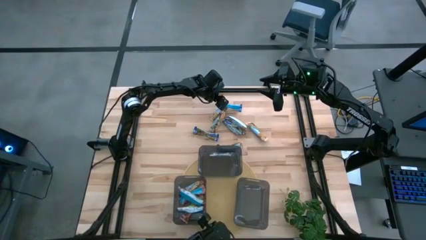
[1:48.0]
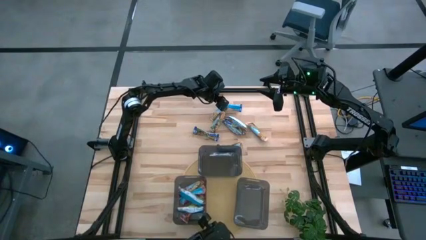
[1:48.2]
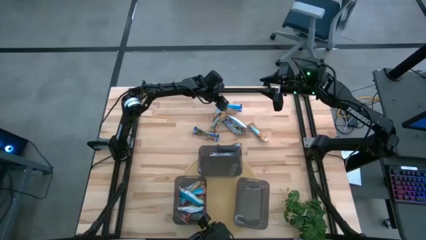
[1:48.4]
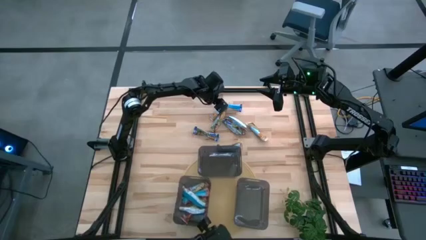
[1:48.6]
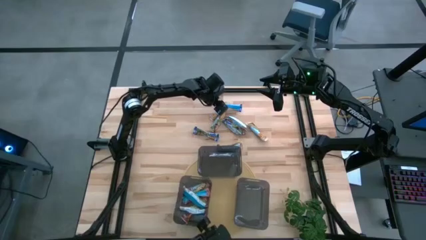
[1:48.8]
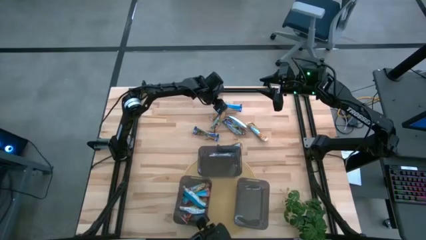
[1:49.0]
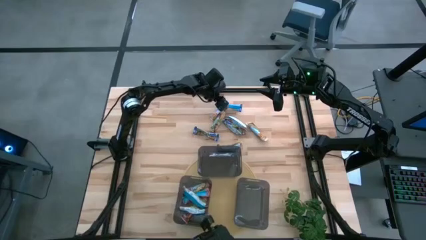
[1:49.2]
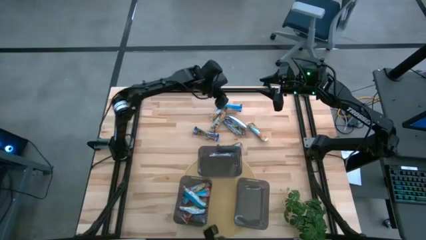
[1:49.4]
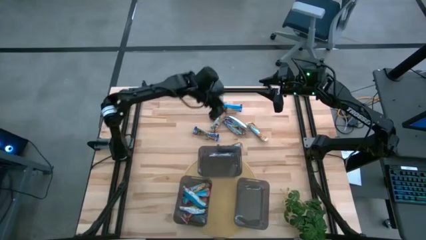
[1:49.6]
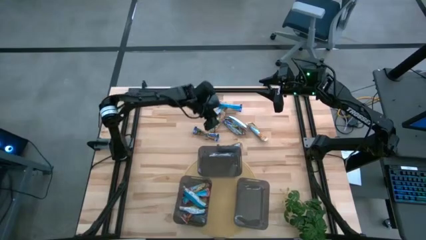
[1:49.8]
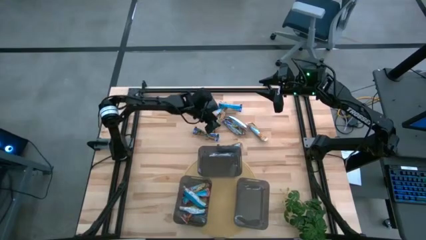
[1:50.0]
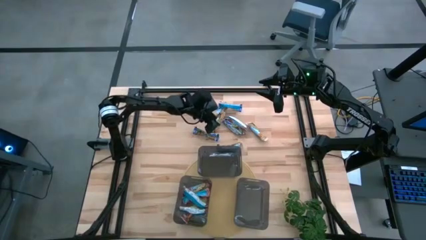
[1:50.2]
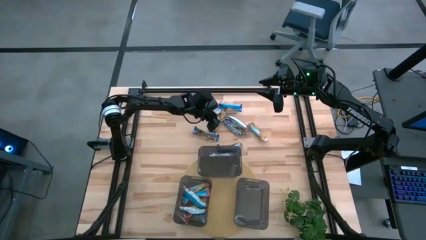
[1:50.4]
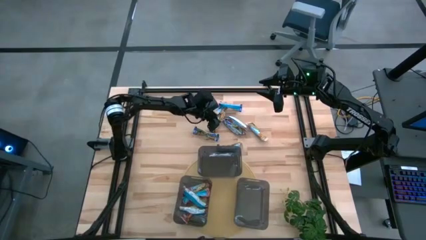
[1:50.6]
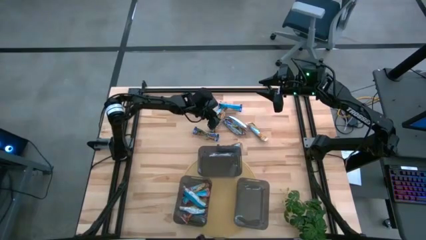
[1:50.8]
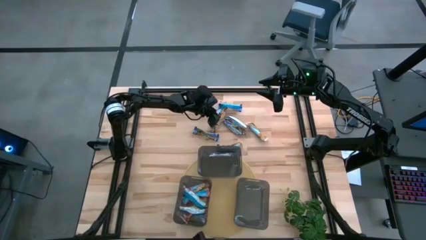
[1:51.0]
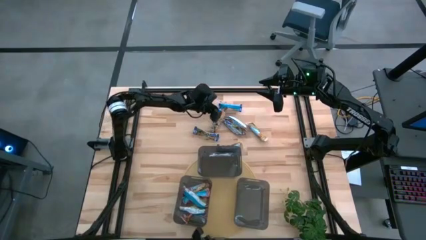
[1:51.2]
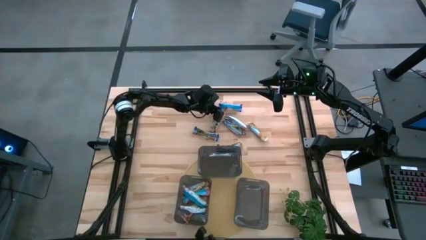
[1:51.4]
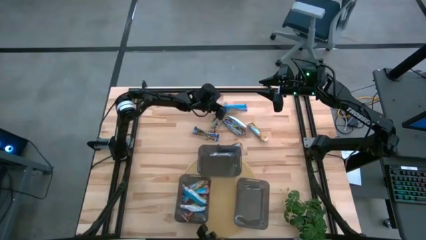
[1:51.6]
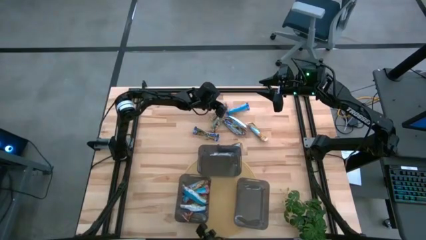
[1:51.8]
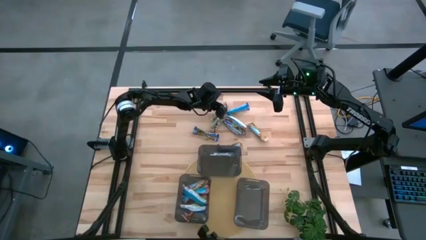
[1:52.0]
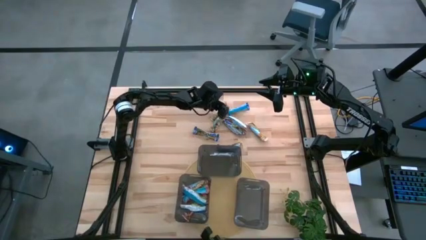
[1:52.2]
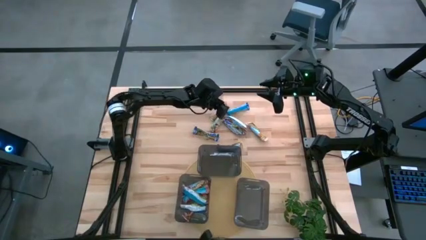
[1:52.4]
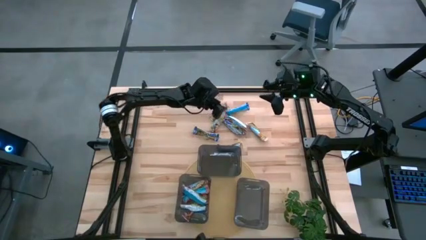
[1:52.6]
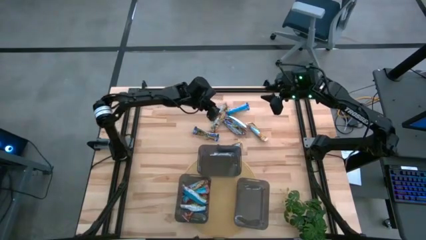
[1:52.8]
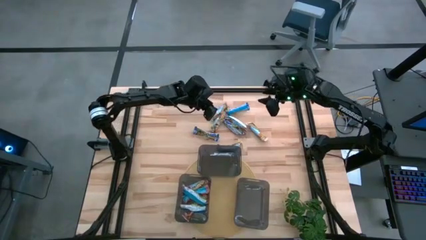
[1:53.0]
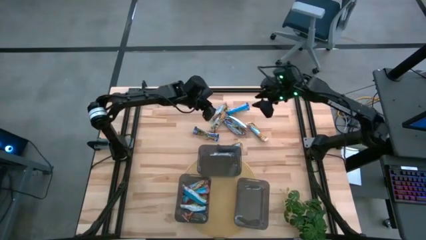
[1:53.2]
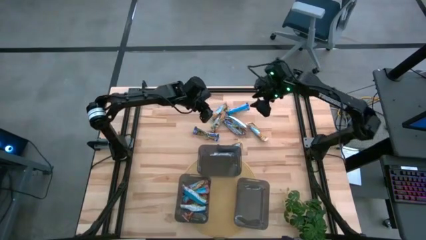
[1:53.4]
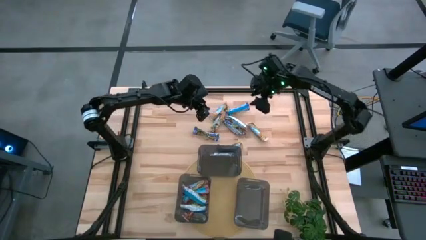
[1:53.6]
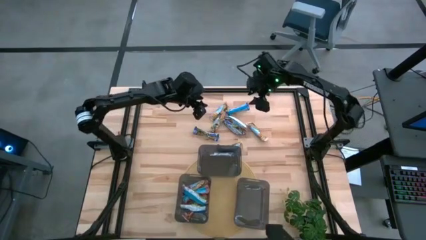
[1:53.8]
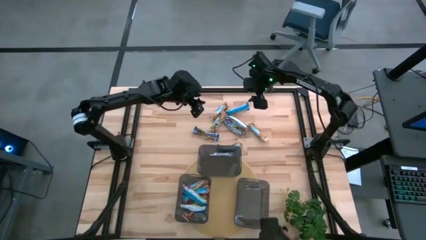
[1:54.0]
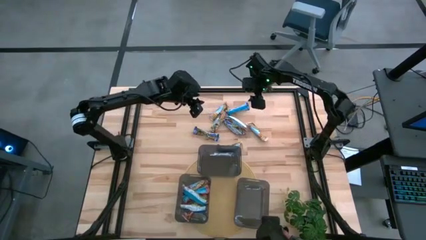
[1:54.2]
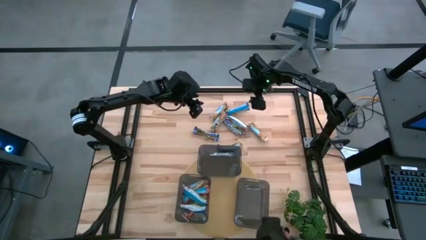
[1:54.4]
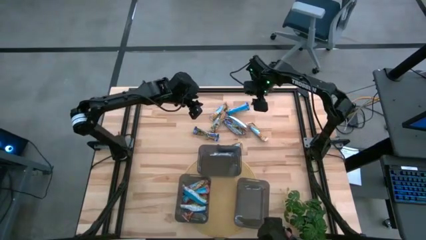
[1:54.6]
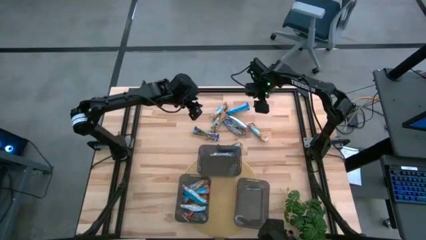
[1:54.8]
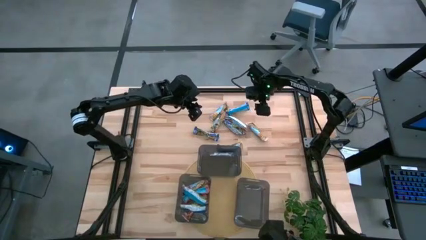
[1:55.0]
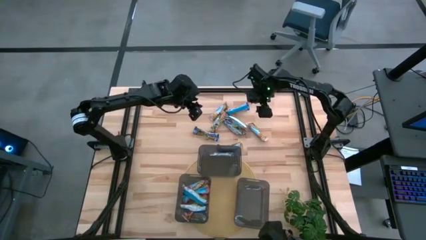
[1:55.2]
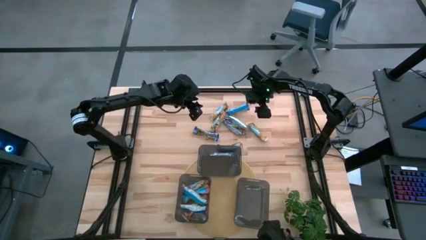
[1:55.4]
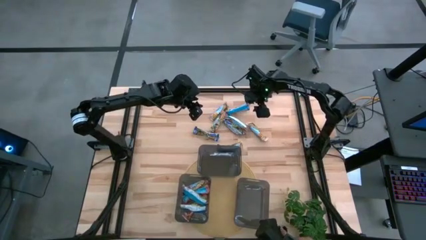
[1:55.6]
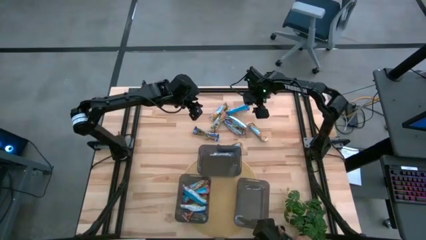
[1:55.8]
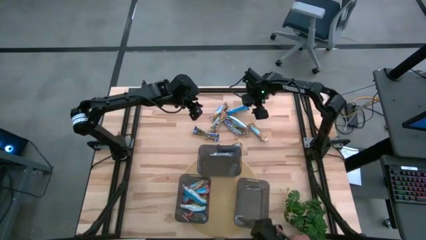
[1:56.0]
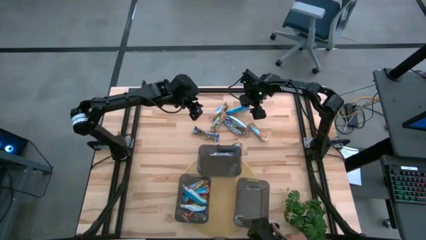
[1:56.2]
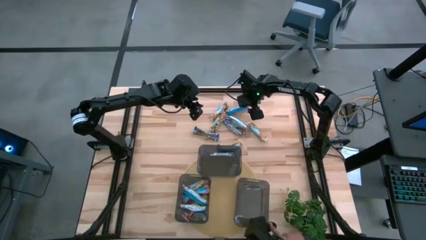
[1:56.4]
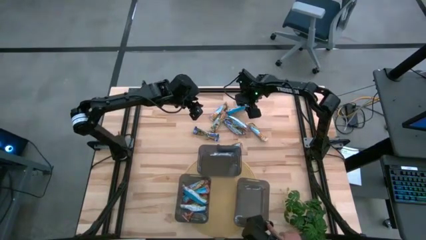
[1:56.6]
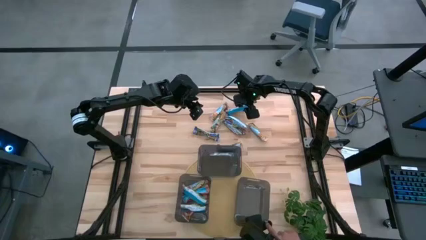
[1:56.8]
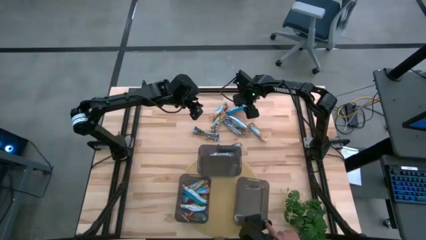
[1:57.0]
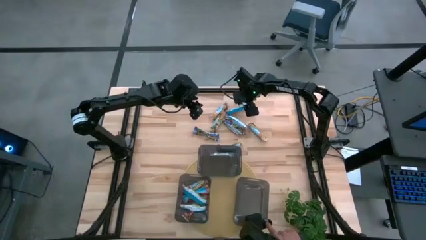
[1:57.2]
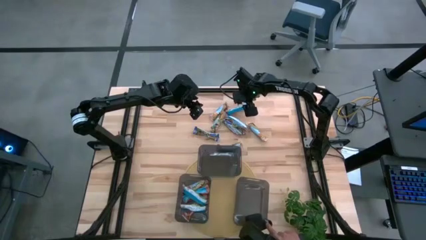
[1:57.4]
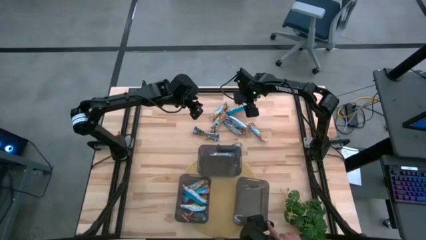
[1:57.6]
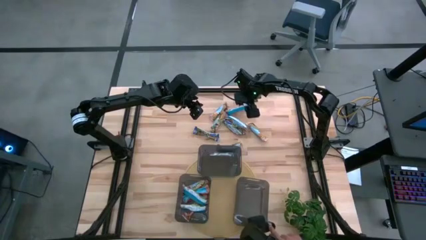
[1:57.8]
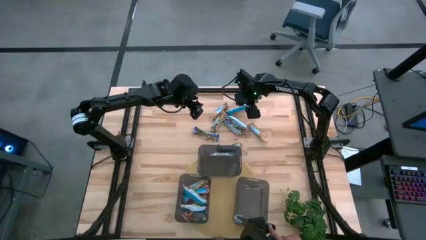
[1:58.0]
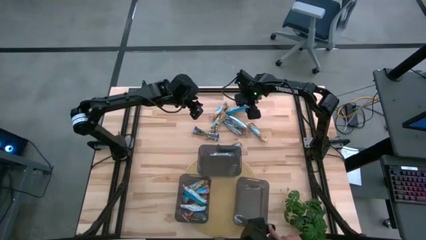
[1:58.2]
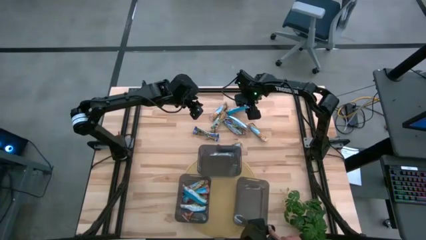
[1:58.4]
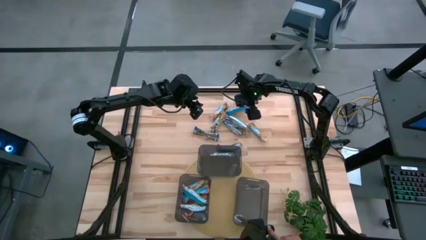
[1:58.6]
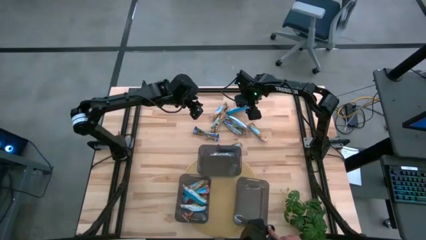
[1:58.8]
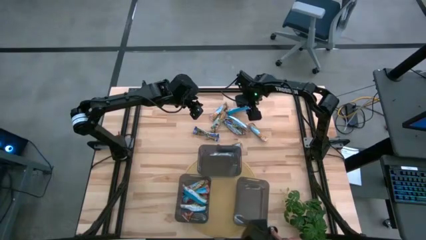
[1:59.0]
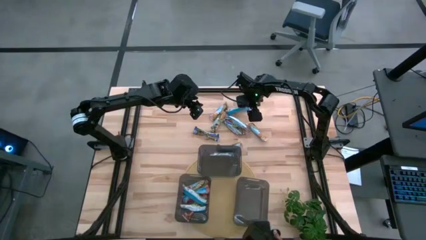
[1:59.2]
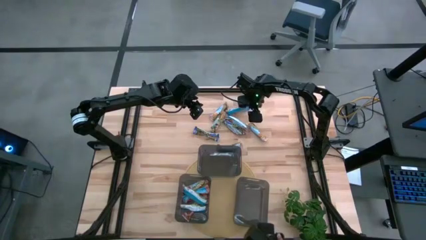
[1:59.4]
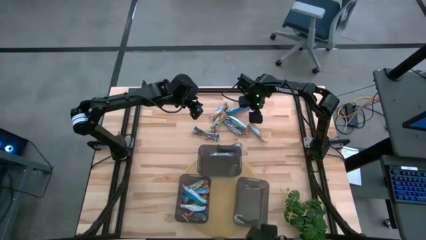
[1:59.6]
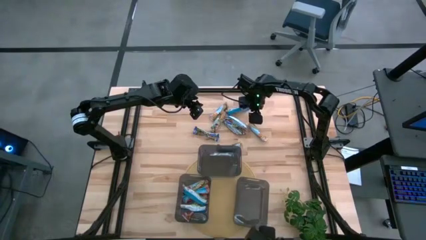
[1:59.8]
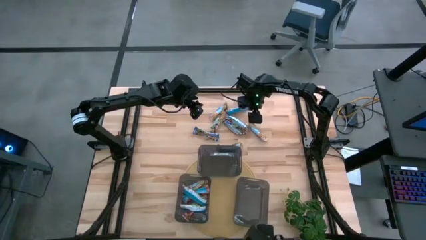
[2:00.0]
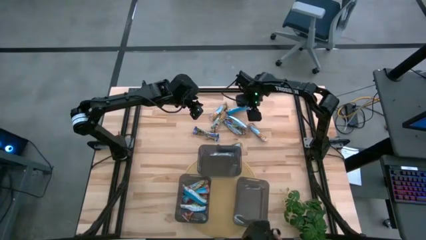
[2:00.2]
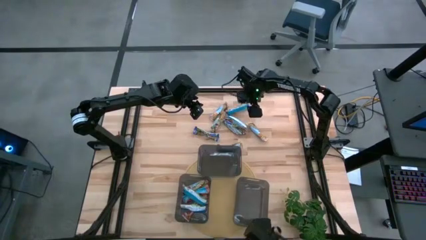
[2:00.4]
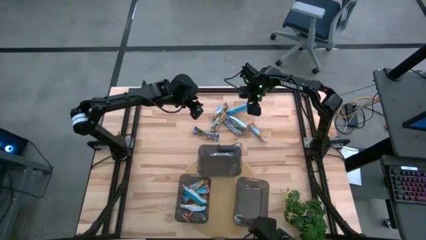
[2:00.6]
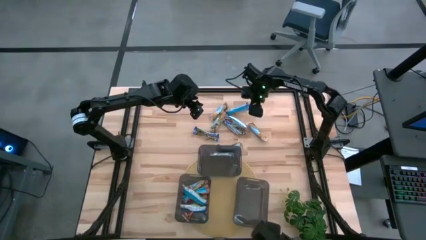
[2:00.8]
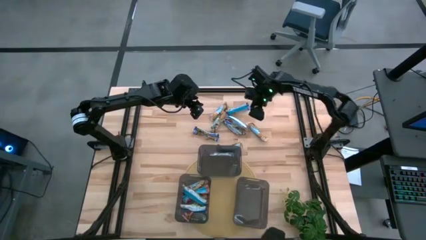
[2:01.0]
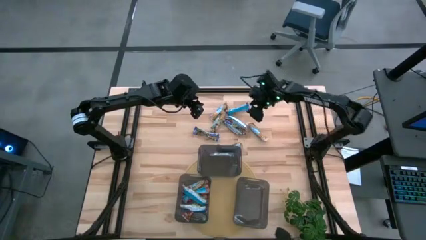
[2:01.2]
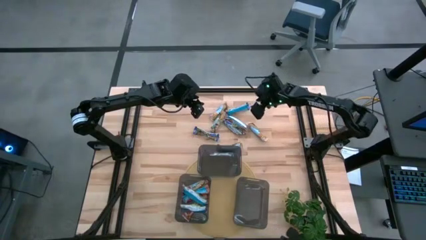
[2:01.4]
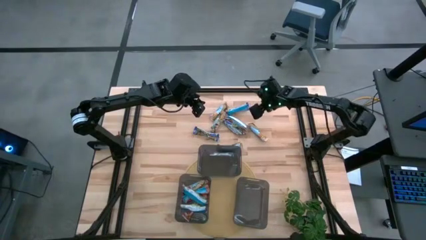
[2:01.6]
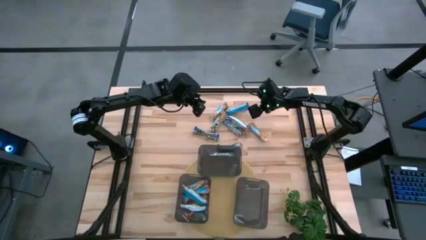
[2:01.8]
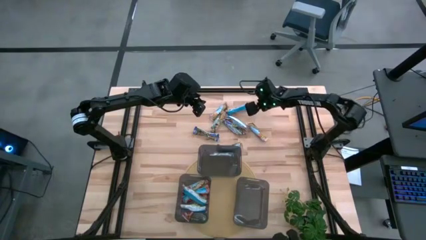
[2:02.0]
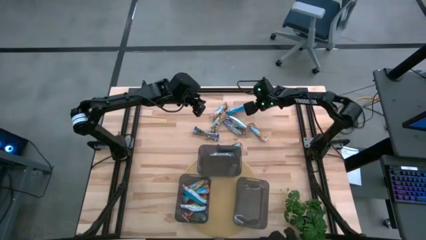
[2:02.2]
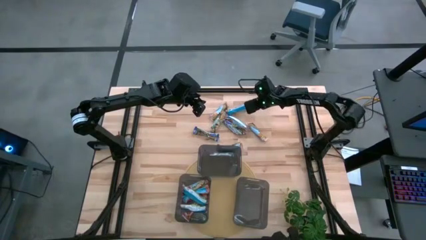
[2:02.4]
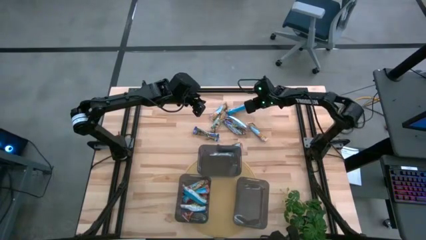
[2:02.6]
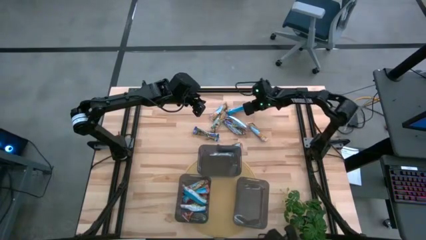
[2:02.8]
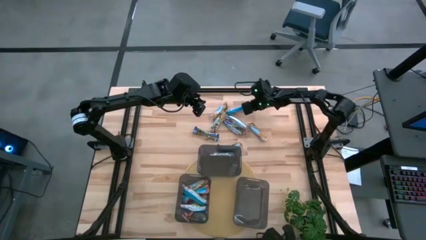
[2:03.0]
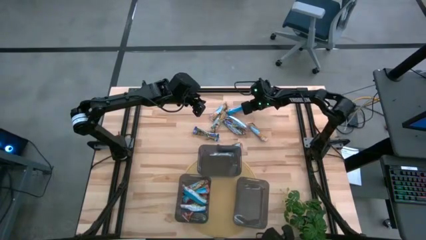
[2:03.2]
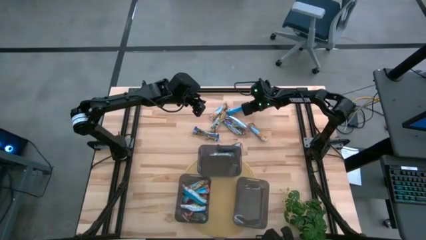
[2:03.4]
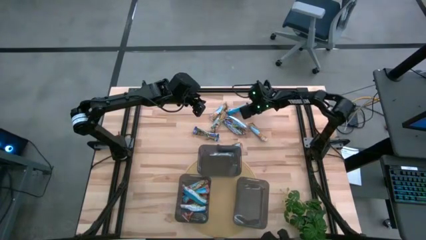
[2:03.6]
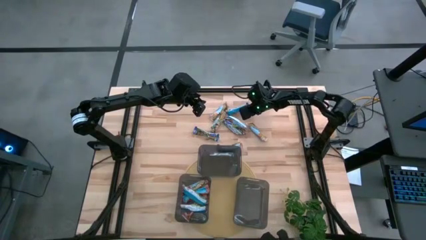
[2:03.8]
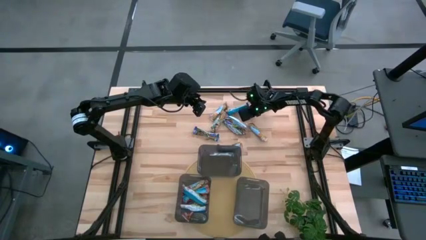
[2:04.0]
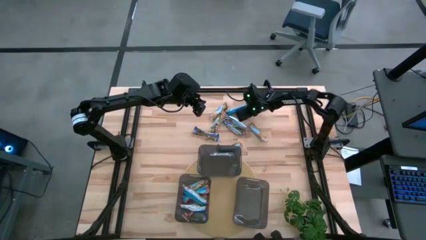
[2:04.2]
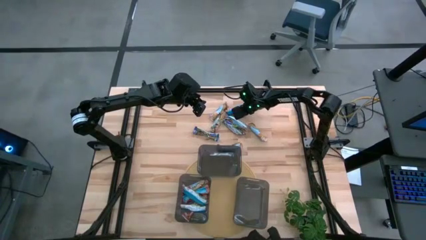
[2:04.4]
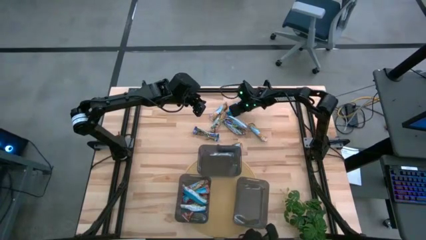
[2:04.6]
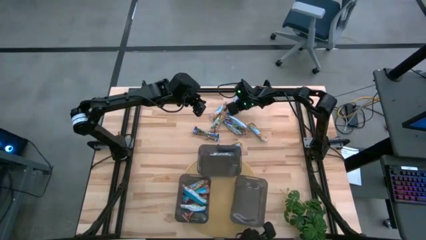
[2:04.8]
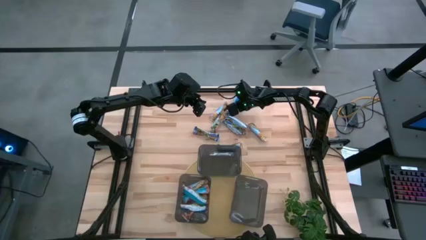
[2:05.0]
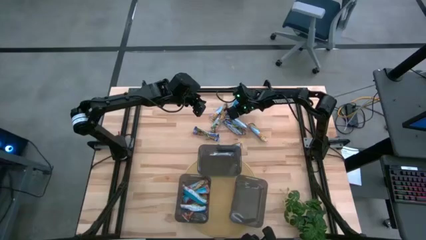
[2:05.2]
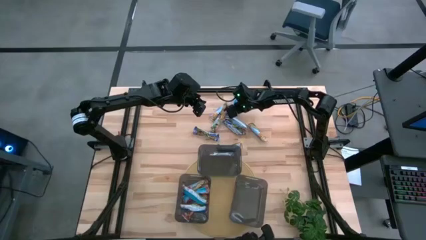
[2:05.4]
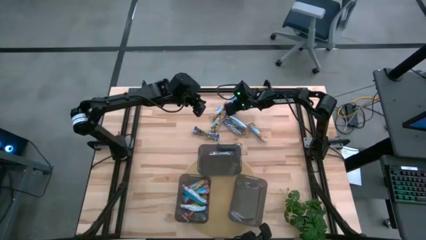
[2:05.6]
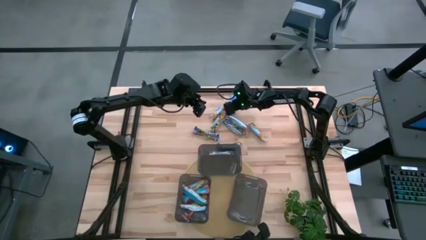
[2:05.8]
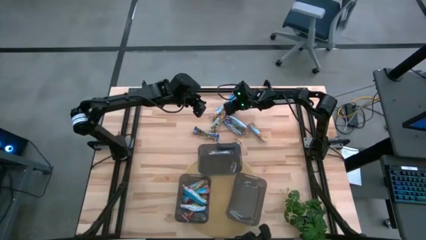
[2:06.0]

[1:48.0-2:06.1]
Task: Pick and place Granola Bars by type
Adjust the blue granola bar on the table
